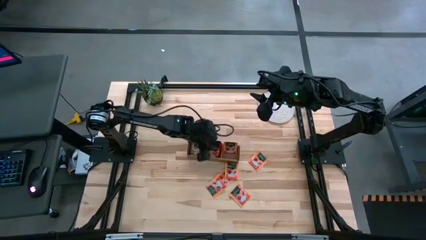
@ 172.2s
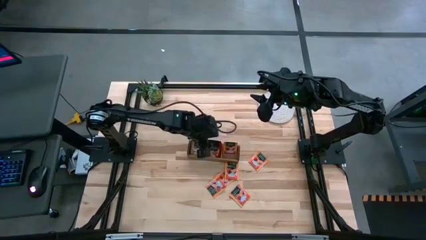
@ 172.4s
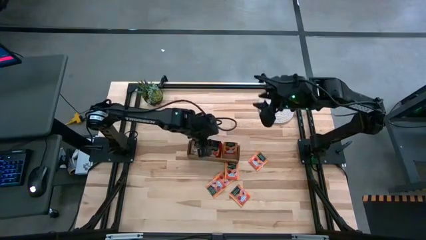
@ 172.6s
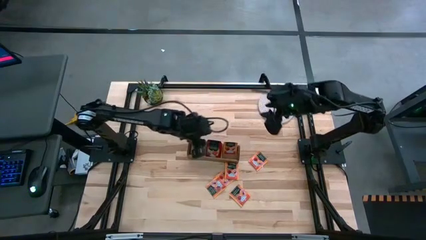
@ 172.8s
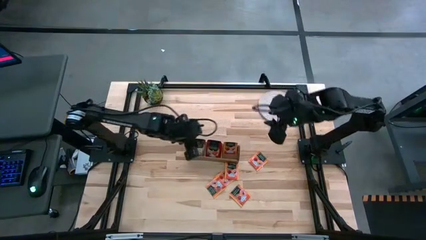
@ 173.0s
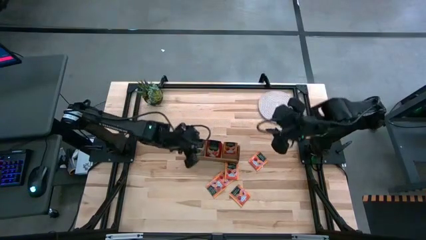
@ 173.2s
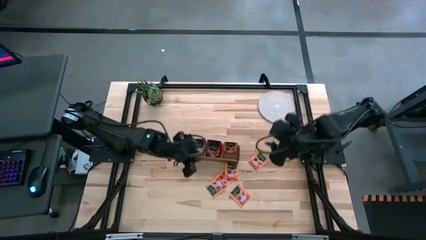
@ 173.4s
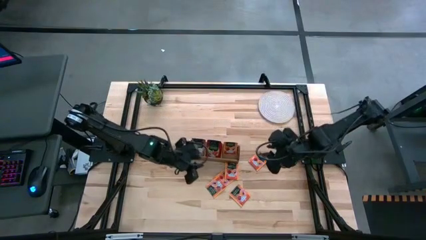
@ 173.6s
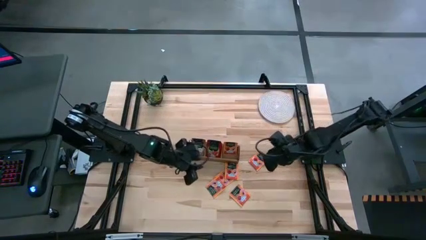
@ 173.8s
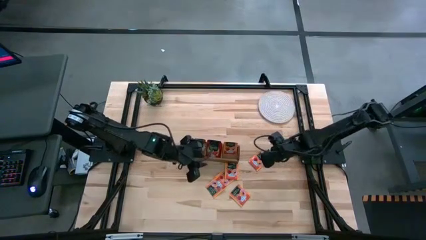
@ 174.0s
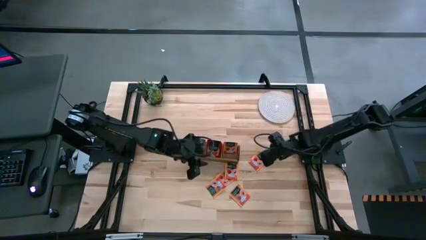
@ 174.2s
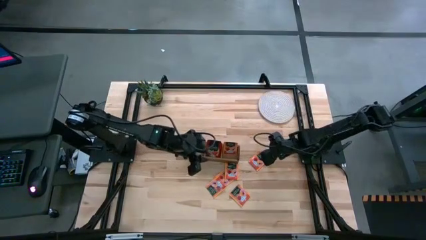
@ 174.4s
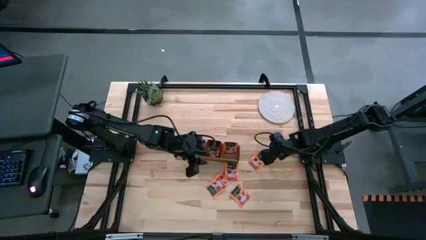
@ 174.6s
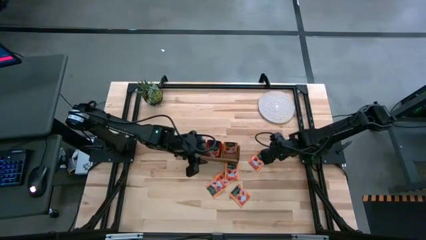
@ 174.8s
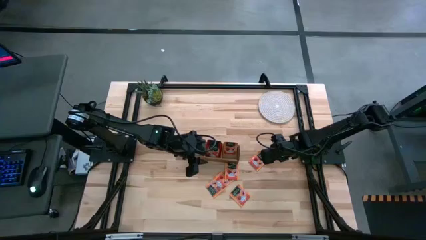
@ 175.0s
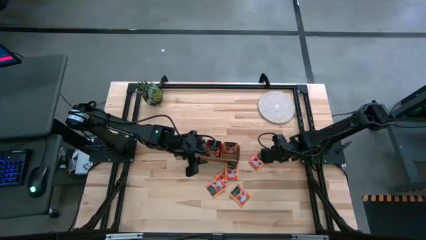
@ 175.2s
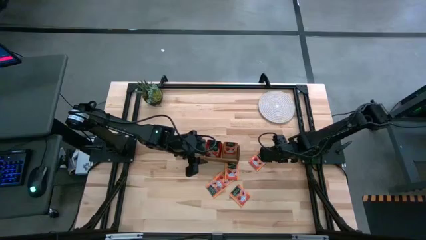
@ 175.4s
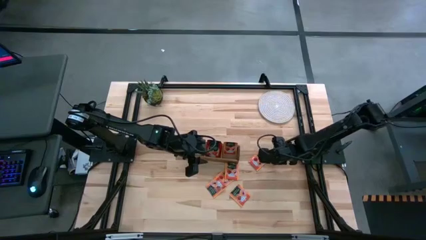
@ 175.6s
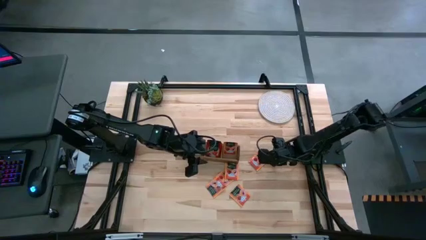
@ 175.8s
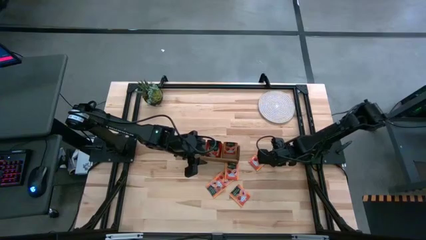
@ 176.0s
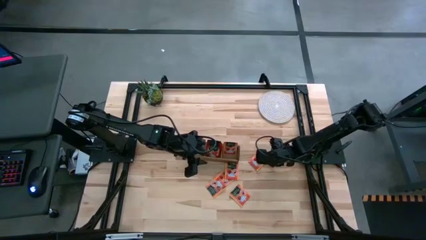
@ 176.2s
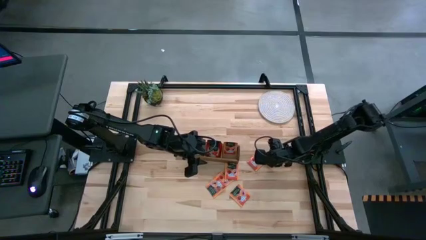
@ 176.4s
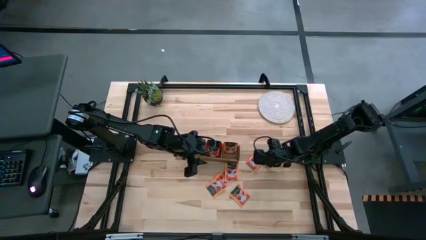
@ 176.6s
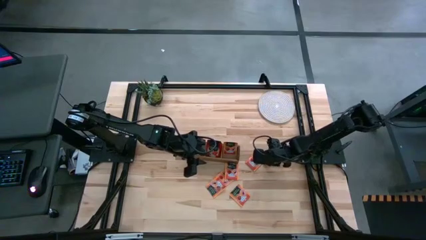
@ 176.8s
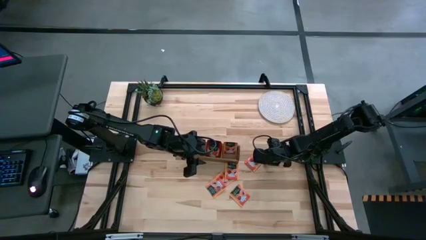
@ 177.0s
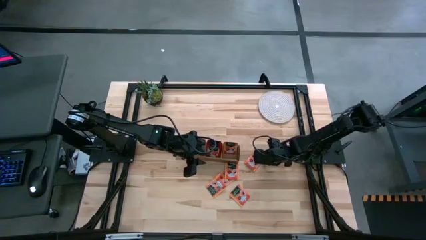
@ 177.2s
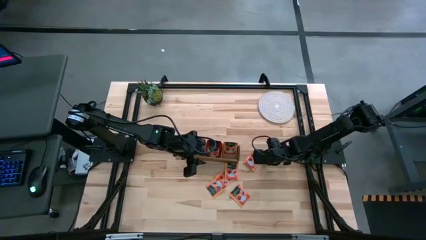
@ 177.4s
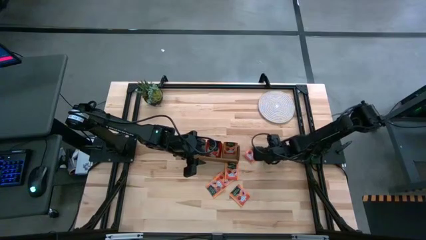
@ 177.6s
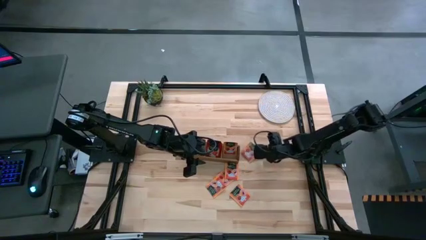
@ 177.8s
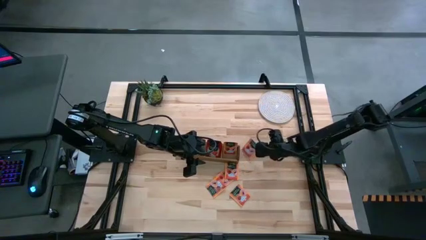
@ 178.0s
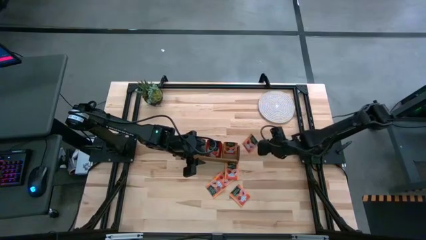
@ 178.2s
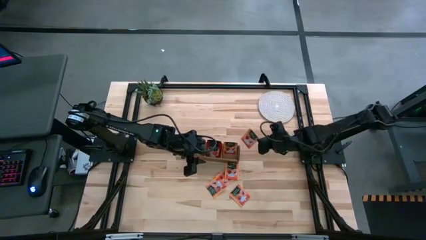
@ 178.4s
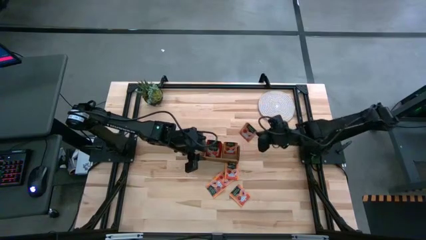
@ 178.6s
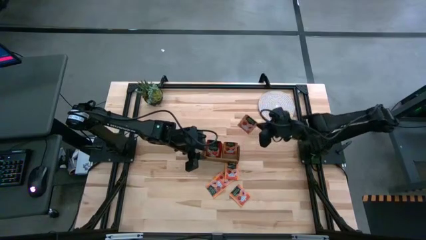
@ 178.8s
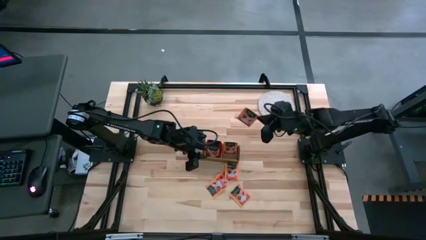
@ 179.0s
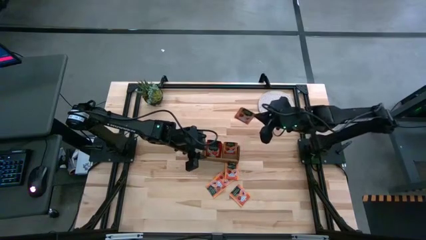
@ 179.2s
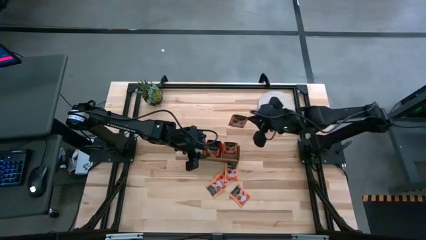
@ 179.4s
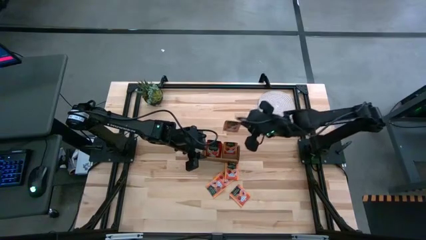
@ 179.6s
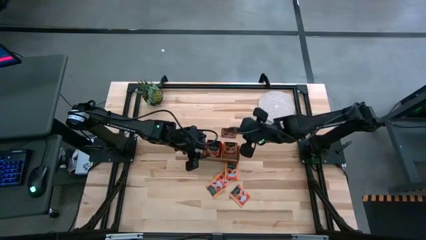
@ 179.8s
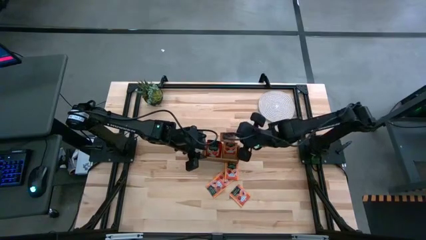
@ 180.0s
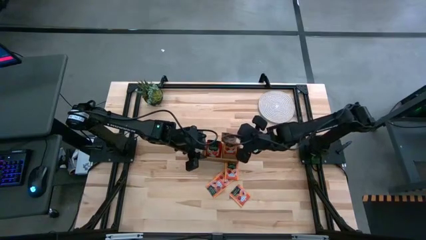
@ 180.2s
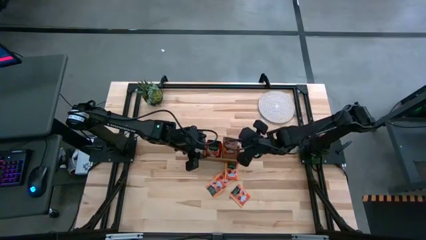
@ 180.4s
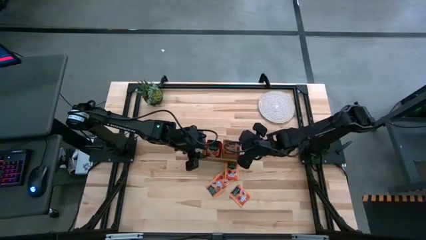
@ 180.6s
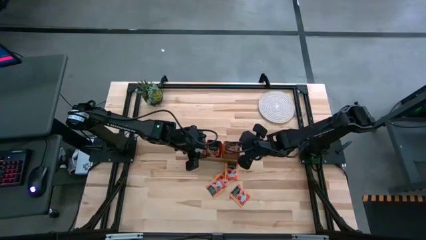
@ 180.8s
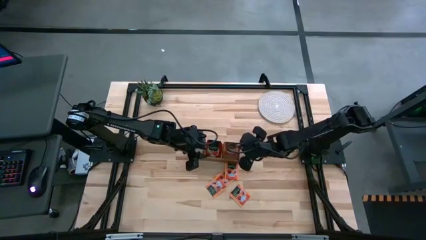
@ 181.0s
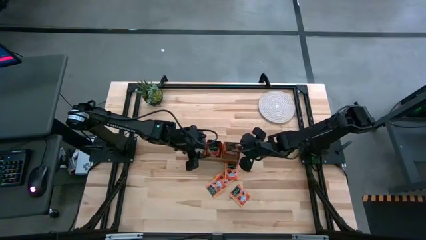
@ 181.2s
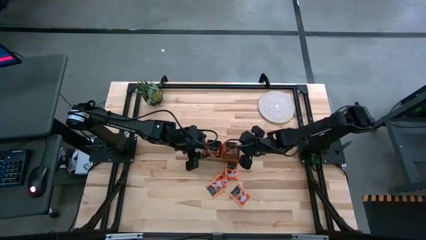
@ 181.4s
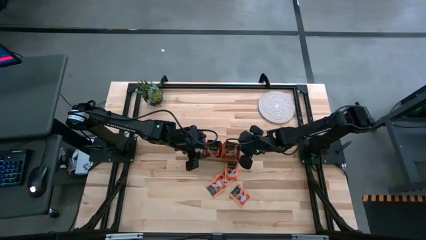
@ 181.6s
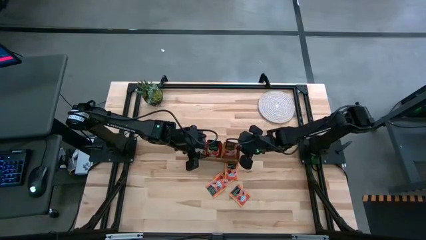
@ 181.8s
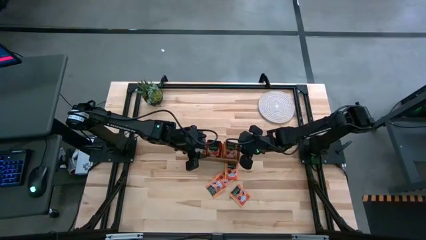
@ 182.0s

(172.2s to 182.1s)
Task: Pick & Place Tea
Put the orange tea bag into the right section of the brown wooden organizer

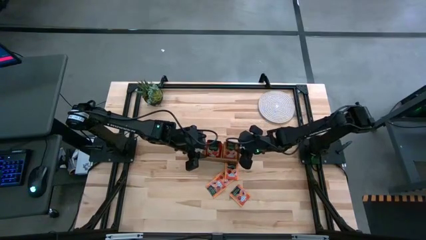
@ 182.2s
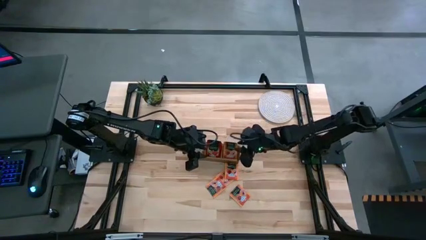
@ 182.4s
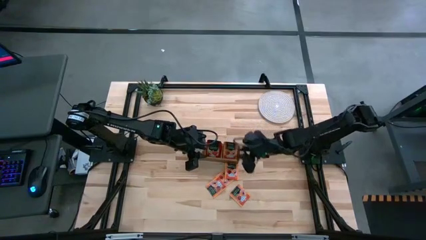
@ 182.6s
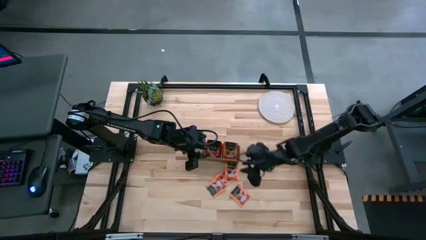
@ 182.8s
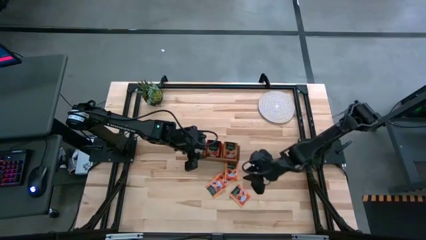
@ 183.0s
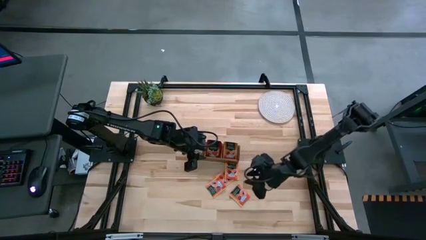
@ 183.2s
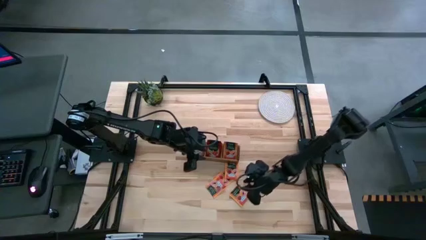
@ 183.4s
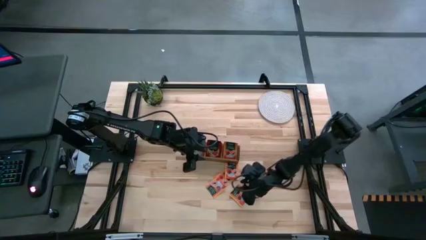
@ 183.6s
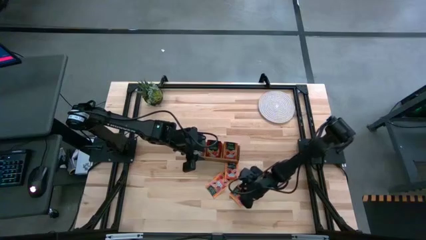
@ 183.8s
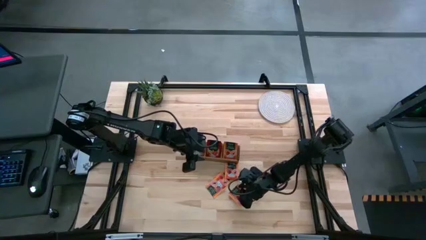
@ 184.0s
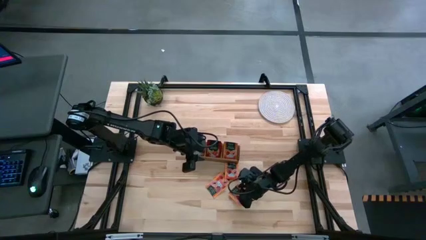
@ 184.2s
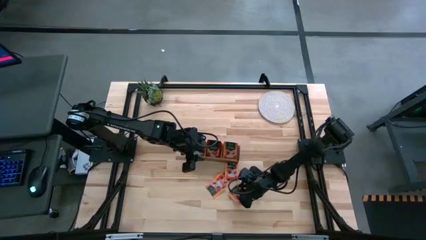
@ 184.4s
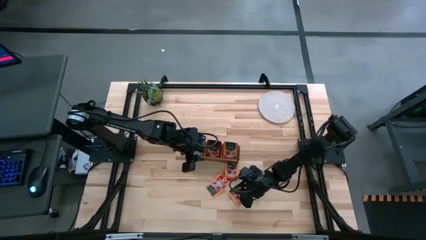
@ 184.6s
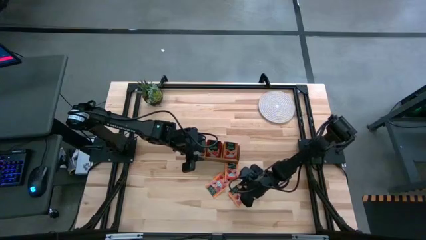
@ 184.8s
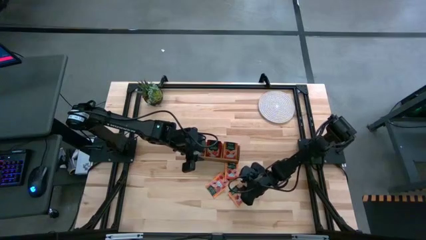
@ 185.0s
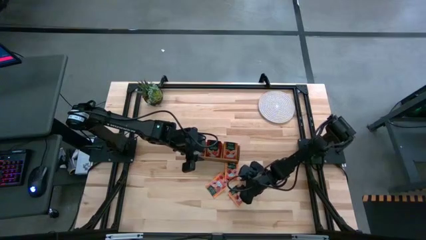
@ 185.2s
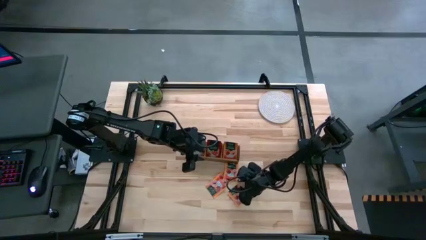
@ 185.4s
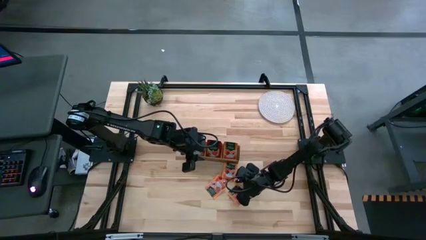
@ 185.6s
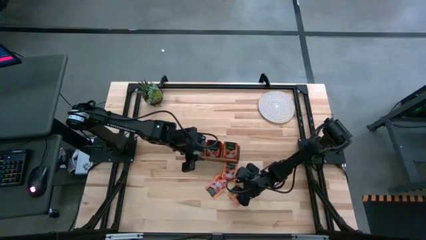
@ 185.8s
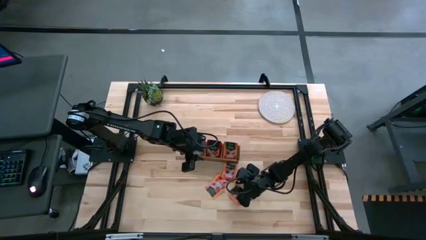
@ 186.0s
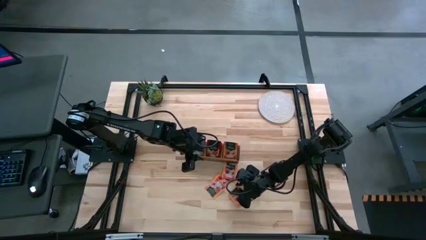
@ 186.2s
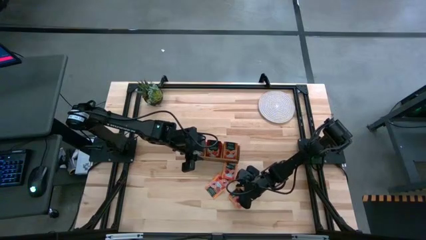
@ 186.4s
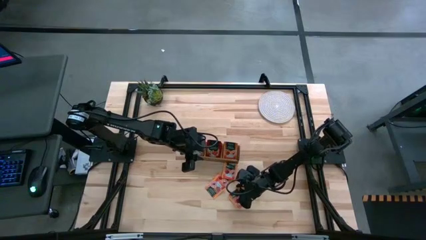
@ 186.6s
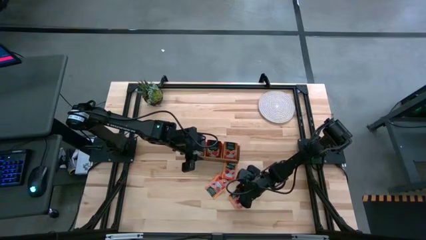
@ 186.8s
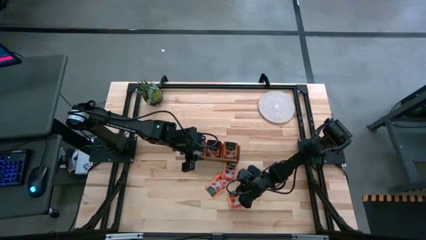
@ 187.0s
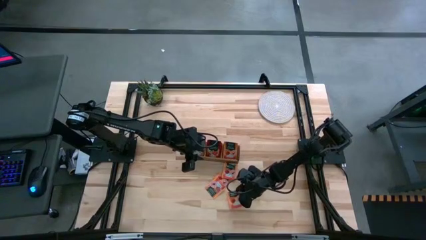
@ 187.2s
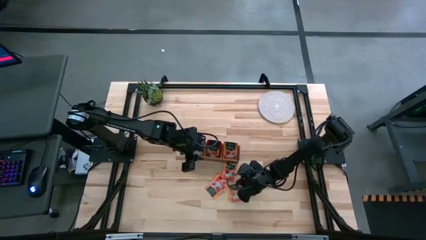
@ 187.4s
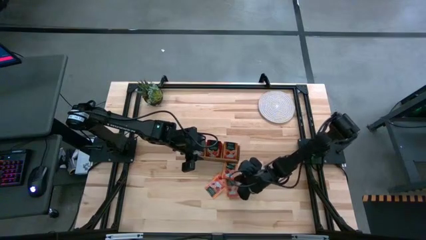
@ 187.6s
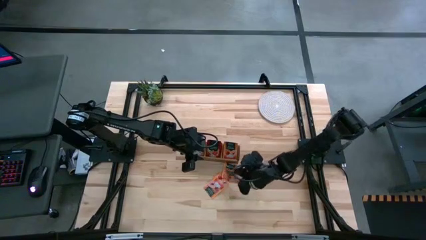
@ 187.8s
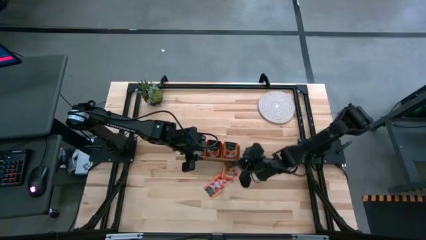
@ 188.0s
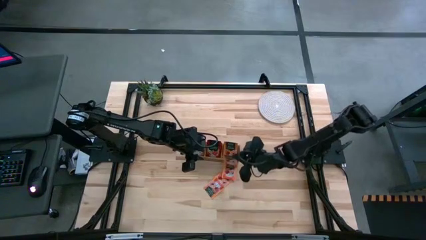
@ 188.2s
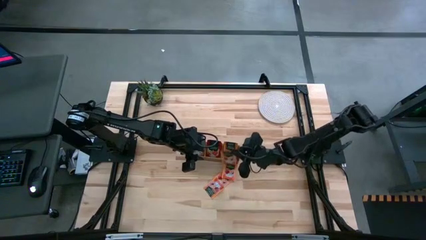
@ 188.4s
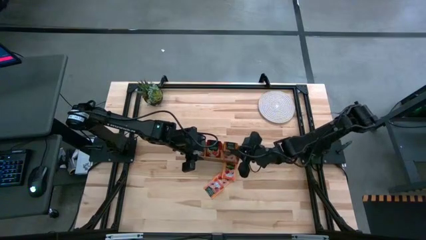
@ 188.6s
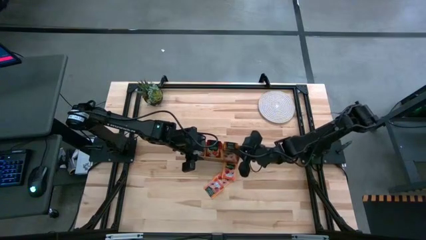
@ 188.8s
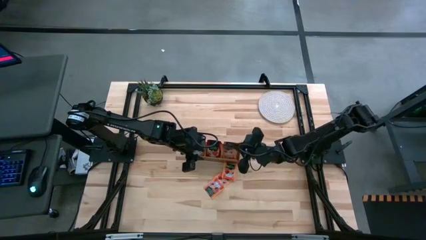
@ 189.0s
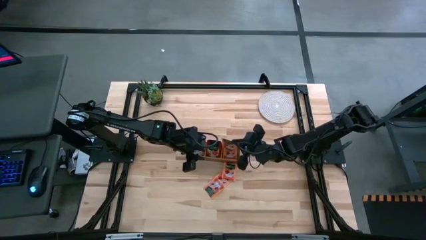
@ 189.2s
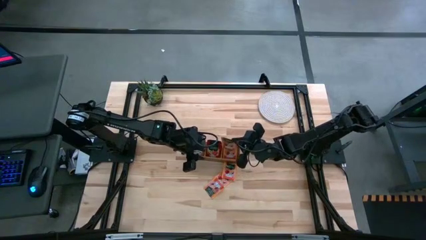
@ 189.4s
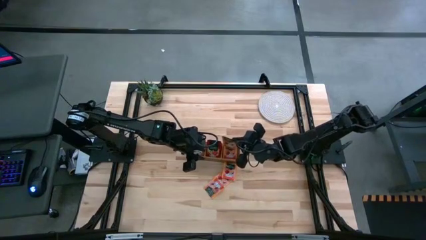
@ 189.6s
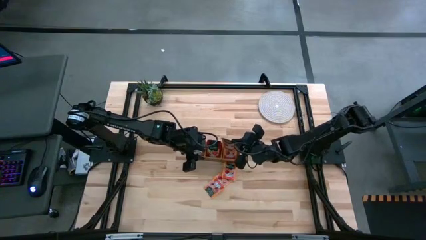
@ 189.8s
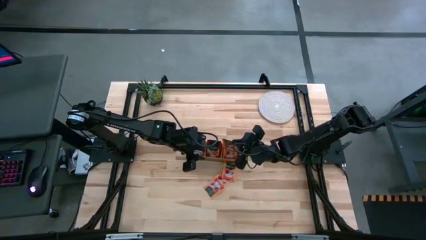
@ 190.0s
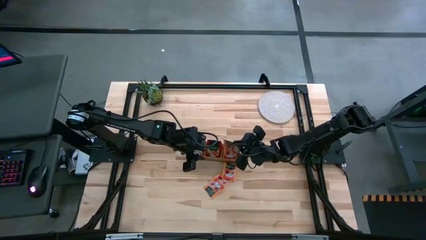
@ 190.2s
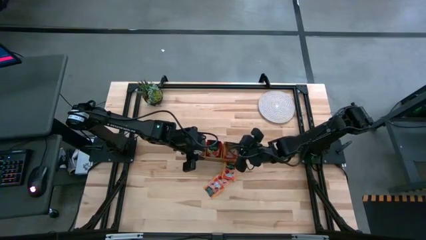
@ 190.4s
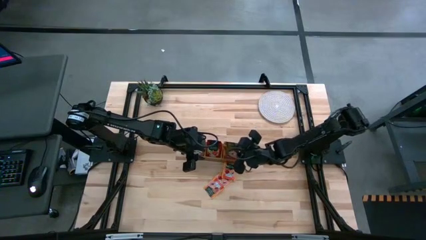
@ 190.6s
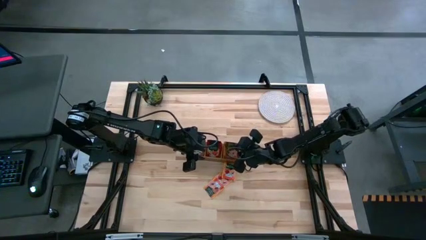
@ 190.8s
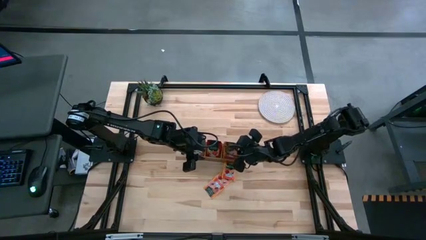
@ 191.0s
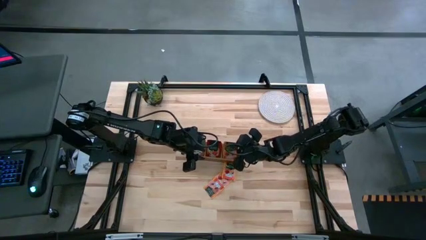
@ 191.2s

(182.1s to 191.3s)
Put the orange tea bag into the right section of the brown wooden organizer
